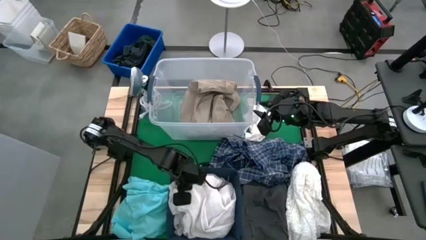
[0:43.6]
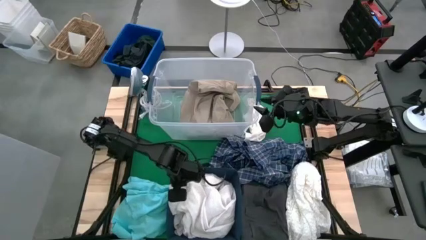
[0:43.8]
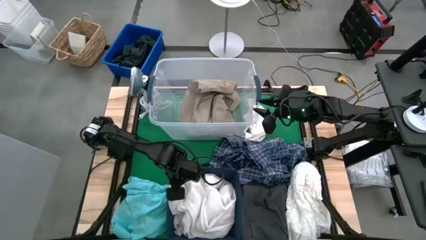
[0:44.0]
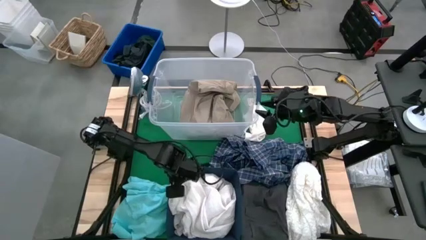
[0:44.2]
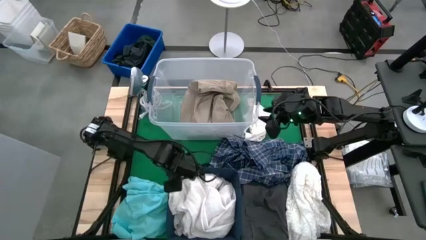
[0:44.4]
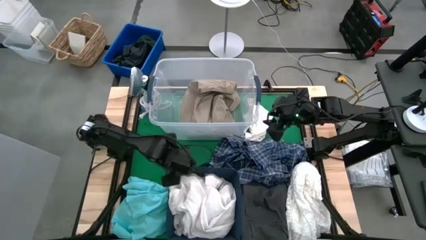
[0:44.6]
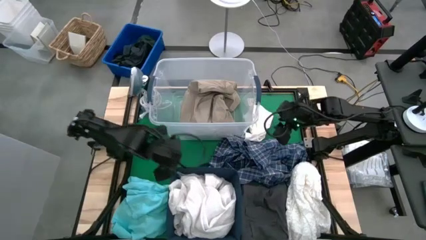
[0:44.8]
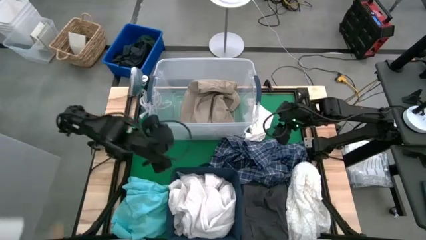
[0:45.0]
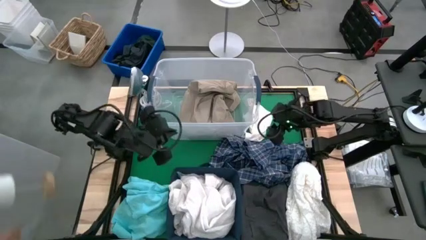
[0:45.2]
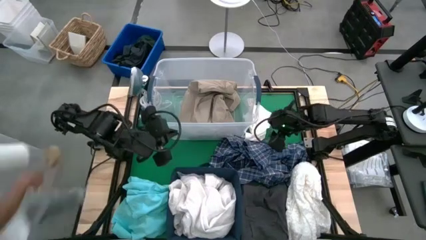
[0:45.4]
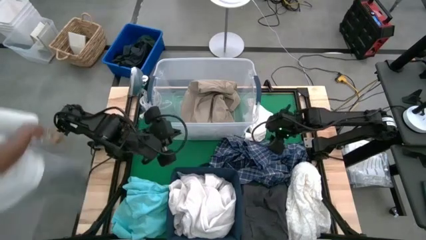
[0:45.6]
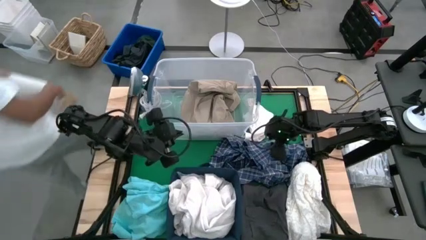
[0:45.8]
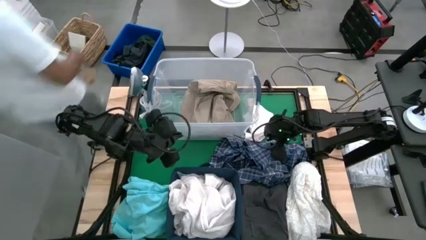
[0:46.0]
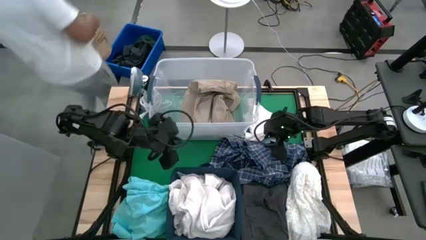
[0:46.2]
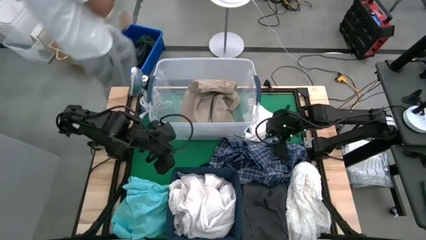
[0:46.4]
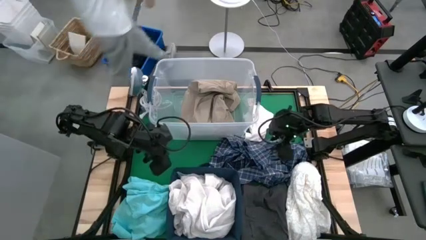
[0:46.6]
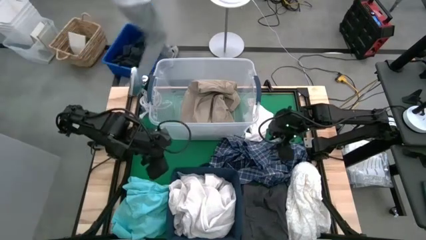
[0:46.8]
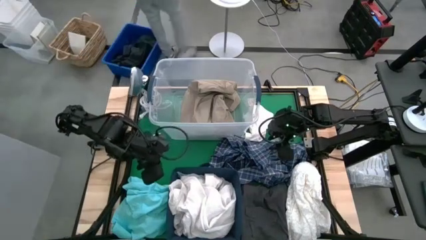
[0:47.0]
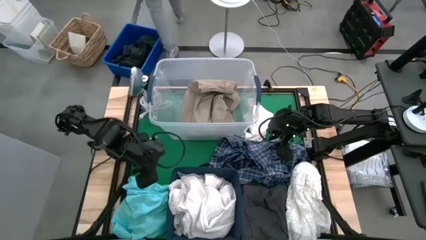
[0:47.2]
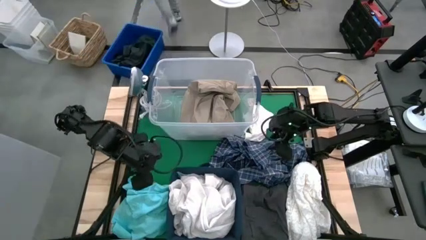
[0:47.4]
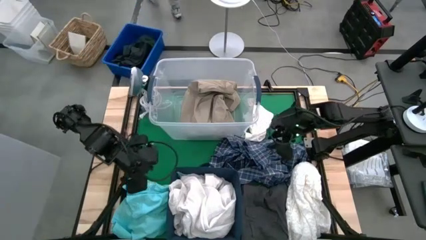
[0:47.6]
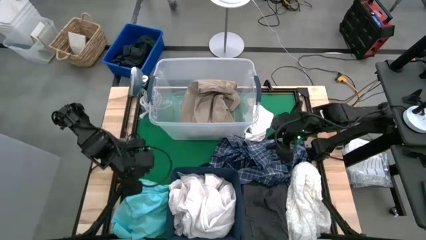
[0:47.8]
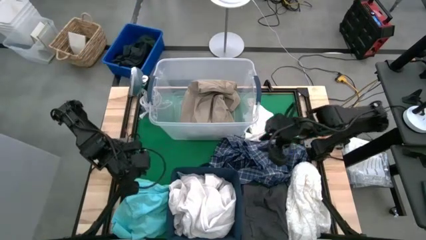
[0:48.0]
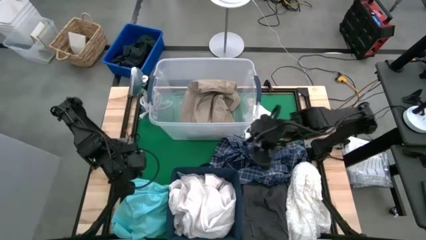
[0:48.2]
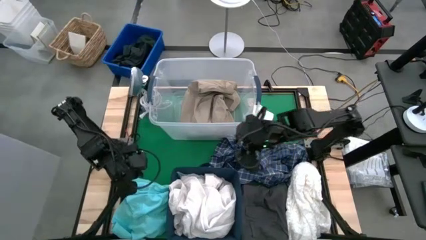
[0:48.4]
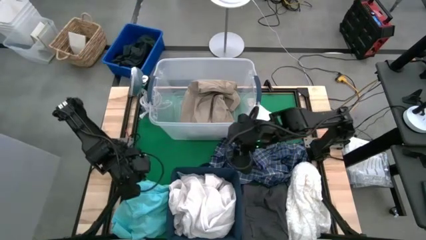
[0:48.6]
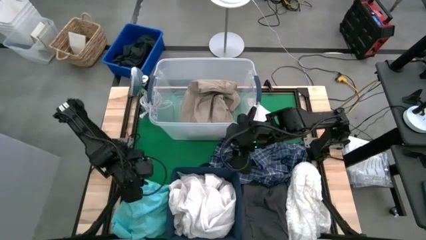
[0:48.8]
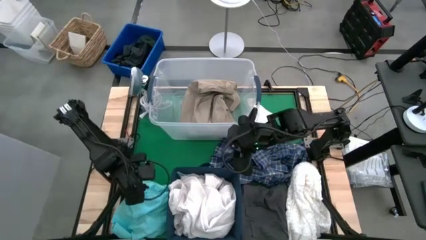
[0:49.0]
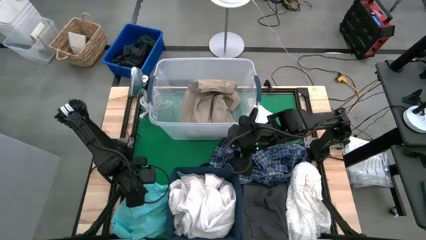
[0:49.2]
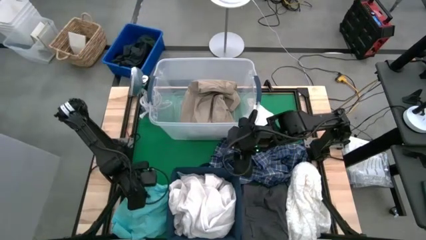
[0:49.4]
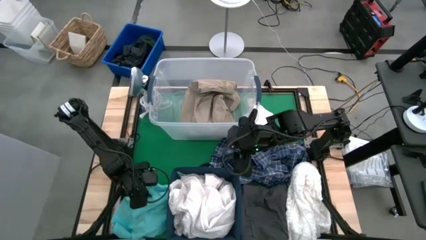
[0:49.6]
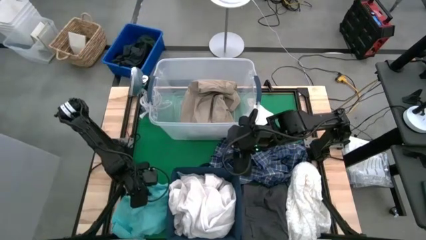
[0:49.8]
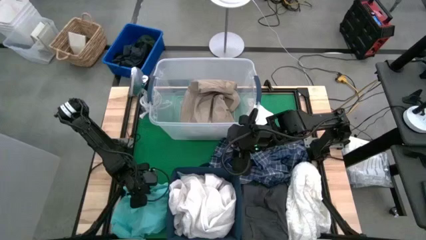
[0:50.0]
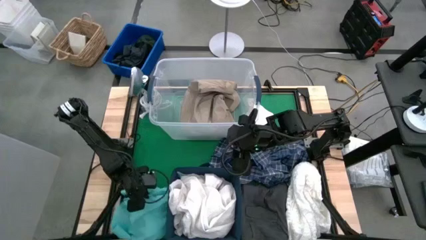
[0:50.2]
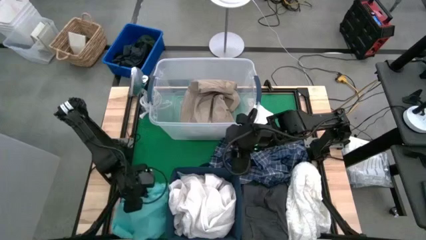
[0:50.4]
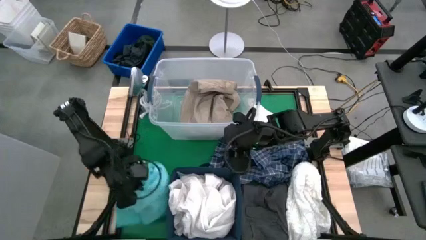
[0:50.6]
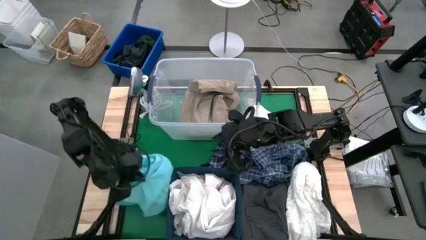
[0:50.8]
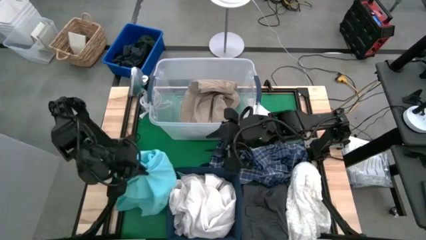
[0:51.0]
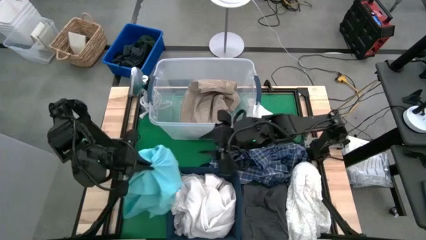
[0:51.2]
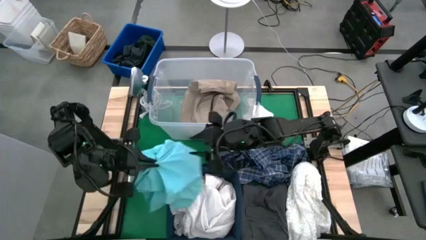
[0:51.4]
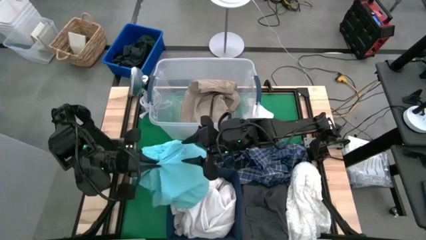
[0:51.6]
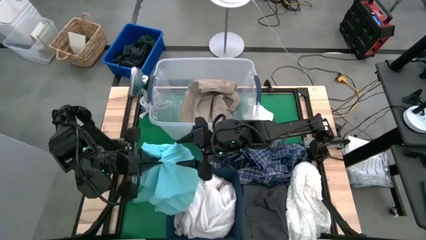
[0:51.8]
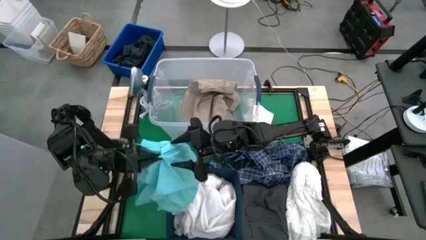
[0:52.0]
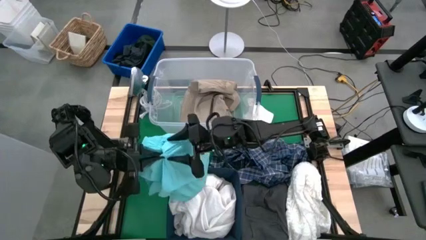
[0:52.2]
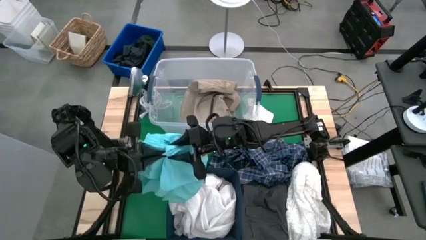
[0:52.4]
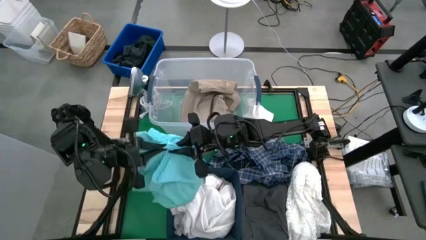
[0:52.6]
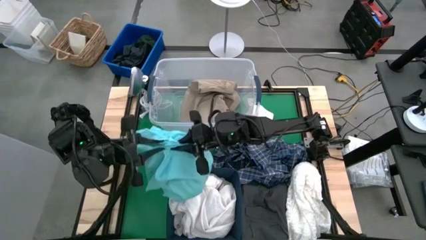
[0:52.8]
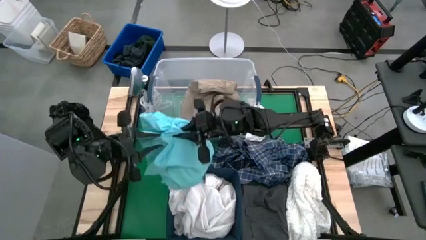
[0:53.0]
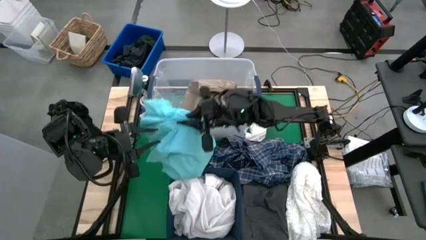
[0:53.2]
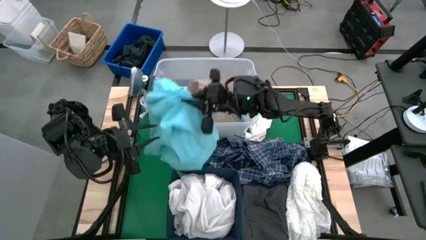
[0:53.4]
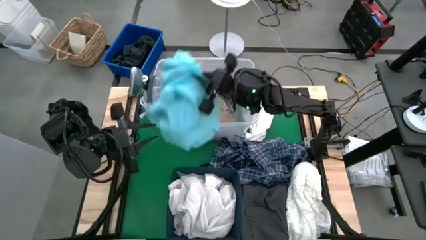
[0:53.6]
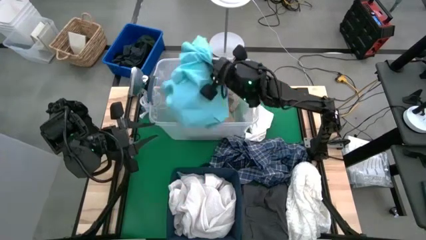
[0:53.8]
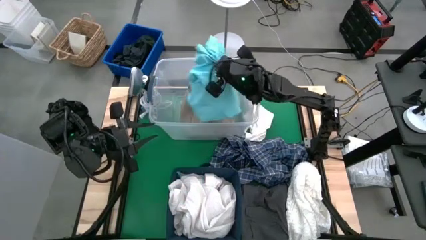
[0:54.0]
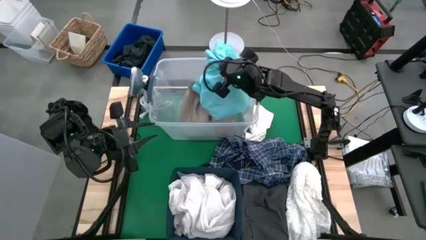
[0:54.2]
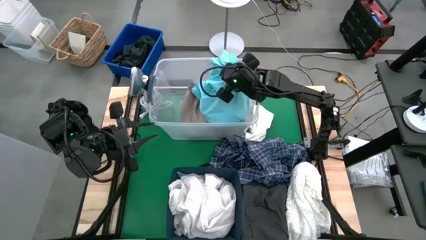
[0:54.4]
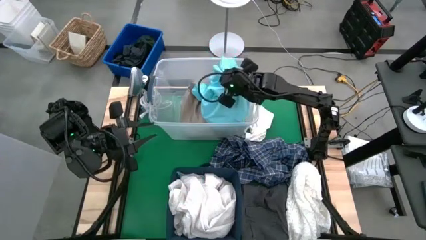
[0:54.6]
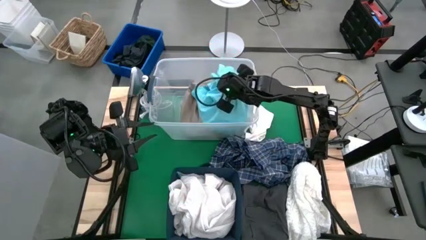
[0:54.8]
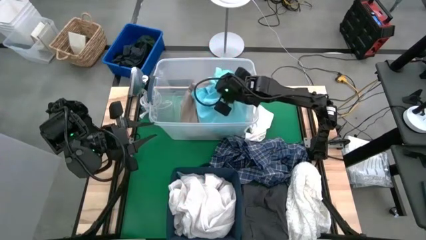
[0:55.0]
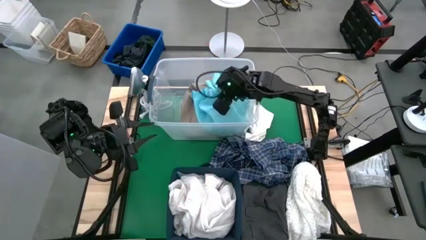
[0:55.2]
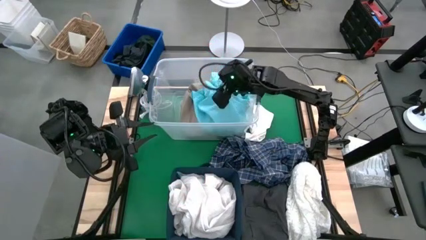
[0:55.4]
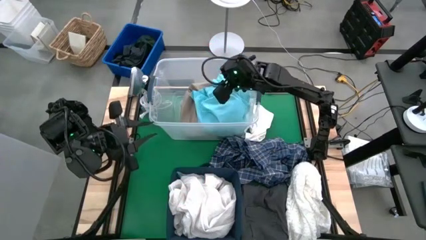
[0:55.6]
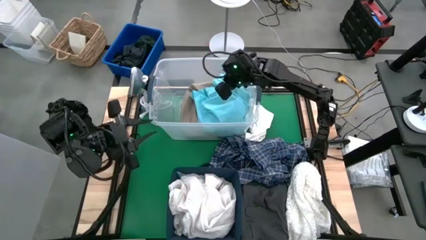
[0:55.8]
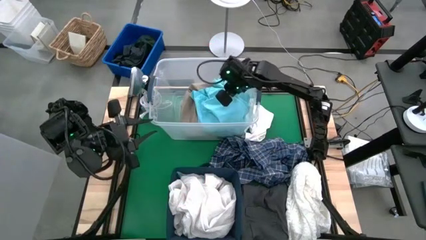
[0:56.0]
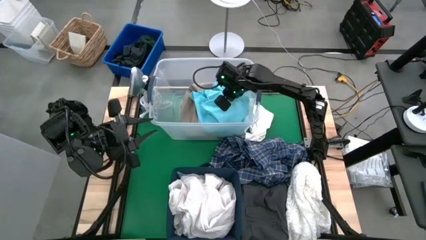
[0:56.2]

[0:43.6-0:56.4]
Task: Sort clothes
Put the light blue shorts into the transparent laundry bin

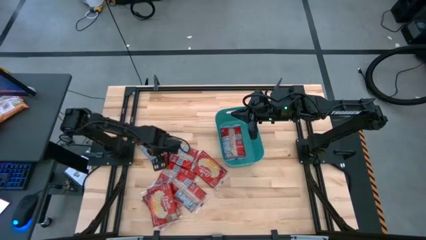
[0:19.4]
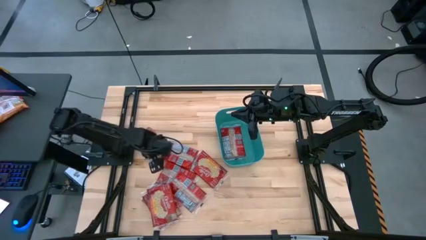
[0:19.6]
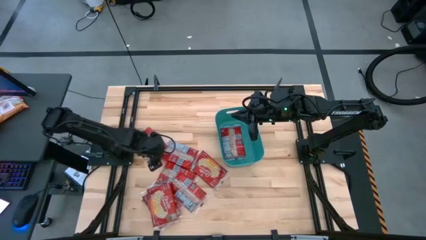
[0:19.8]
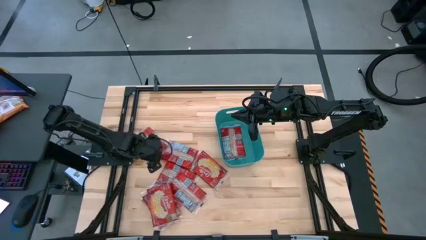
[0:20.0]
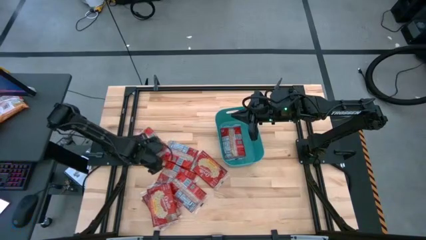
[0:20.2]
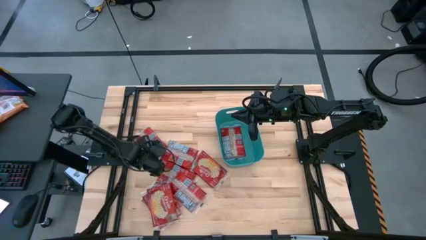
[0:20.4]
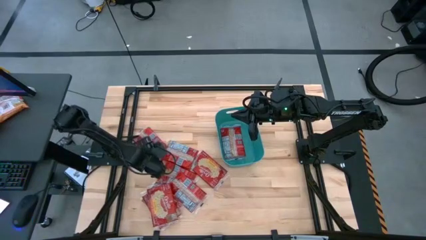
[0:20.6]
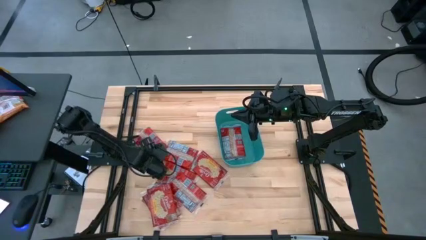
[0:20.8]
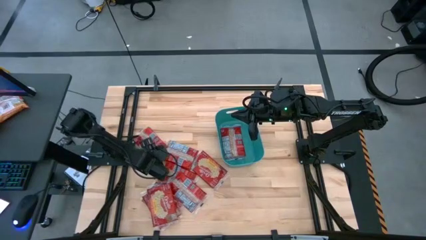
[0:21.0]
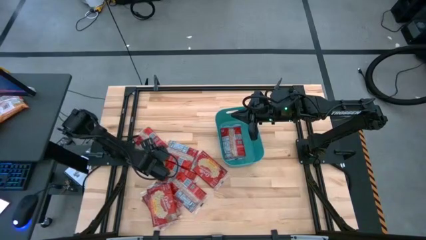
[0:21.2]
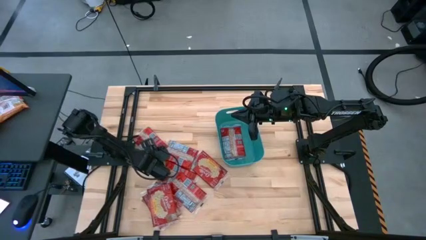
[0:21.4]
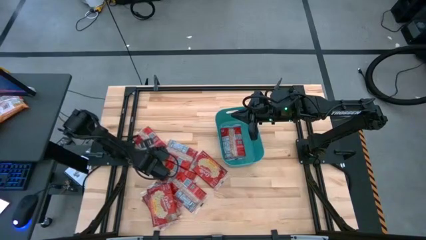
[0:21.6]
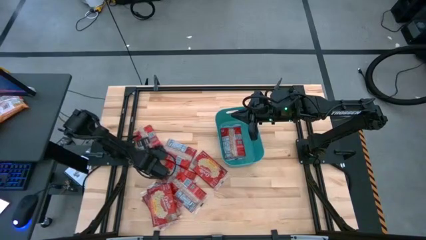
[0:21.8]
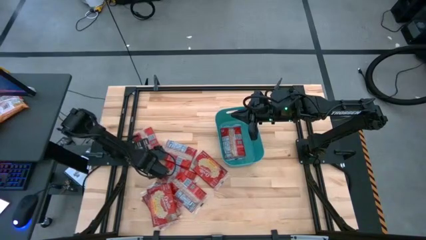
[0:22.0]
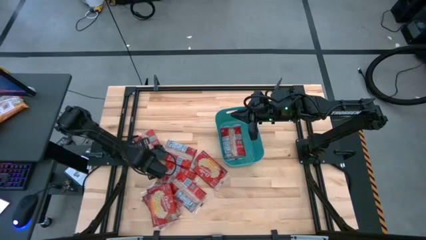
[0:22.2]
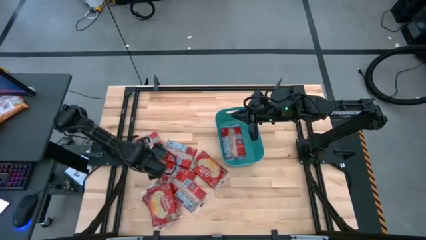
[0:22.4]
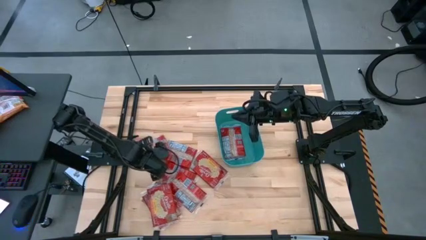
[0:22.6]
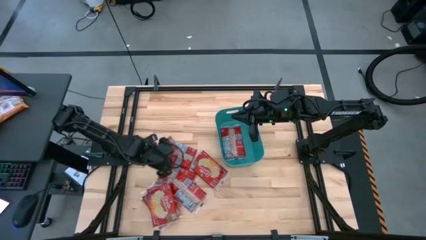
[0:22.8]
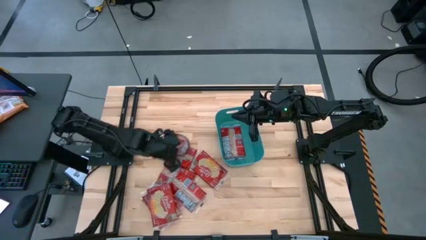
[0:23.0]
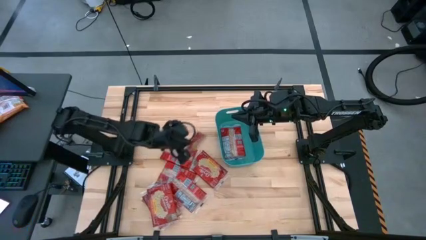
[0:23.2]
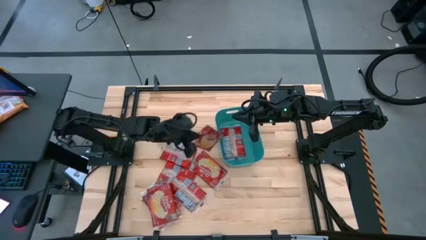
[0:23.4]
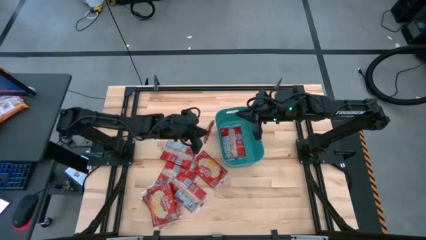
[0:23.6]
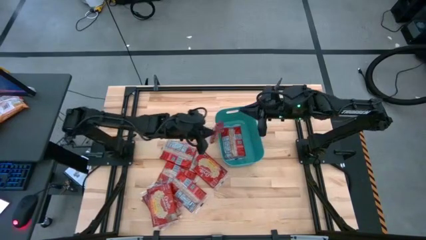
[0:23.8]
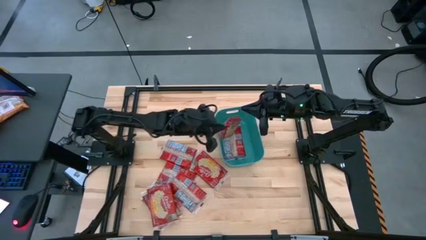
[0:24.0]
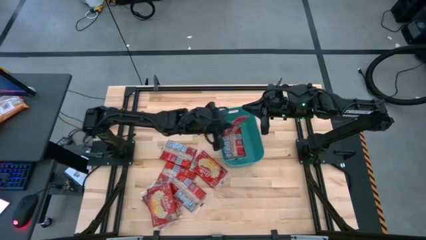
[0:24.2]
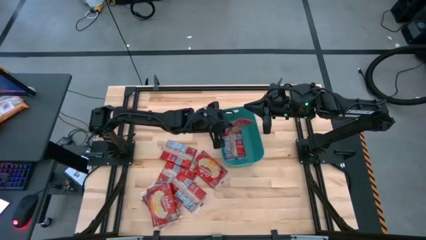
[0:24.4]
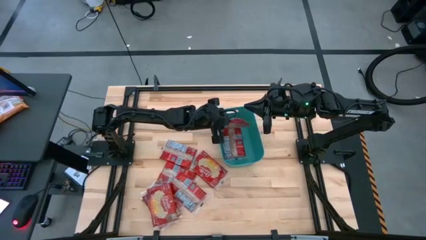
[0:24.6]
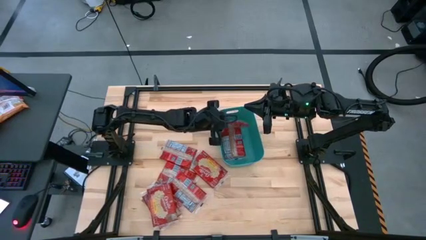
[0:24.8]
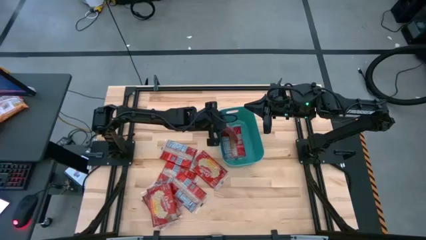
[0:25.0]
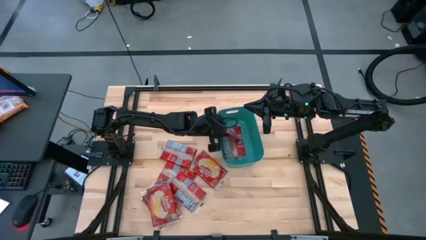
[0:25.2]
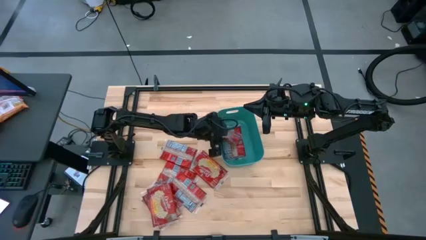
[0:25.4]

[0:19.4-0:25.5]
Task: Sort popcorn bags into baskets
Put the red popcorn pack into the green bin
